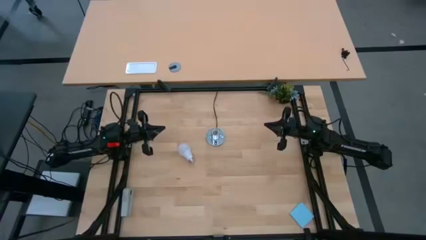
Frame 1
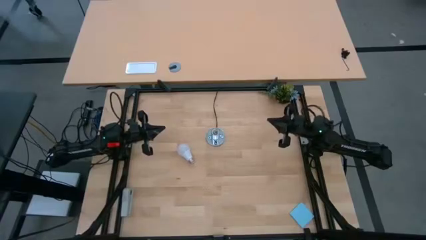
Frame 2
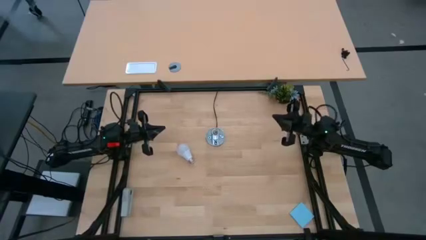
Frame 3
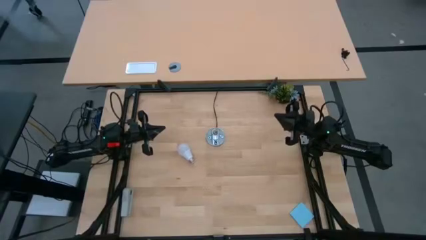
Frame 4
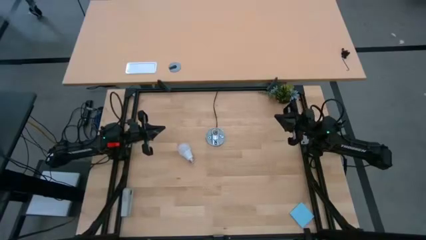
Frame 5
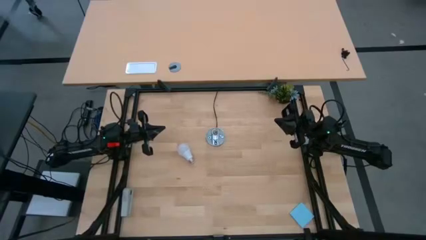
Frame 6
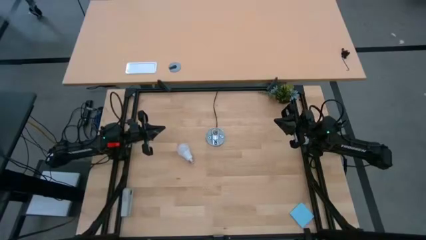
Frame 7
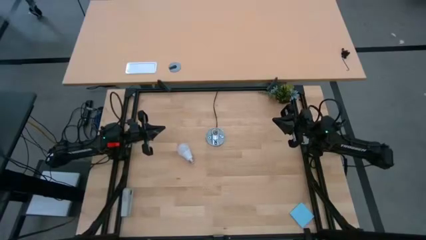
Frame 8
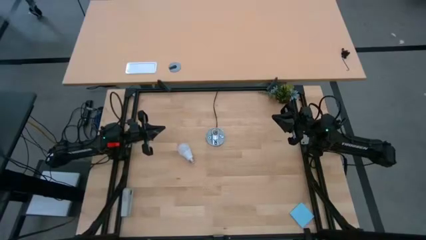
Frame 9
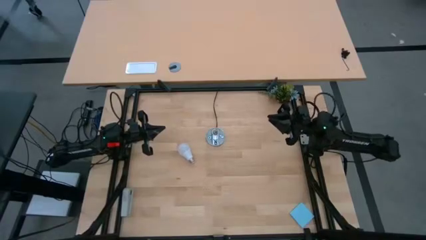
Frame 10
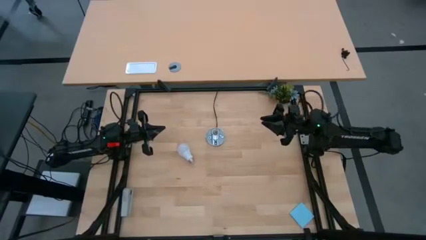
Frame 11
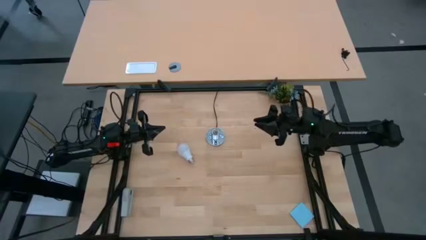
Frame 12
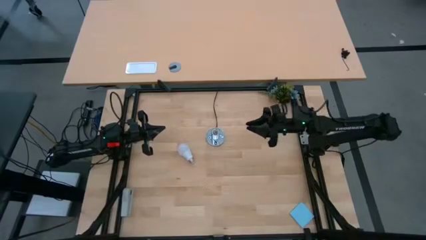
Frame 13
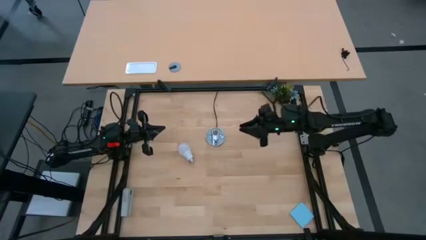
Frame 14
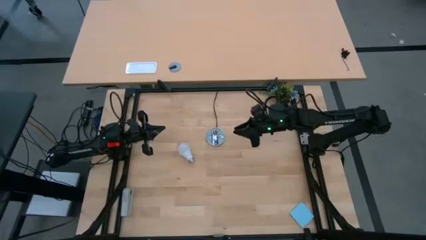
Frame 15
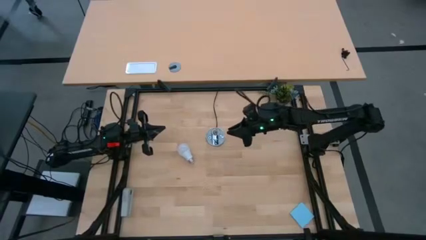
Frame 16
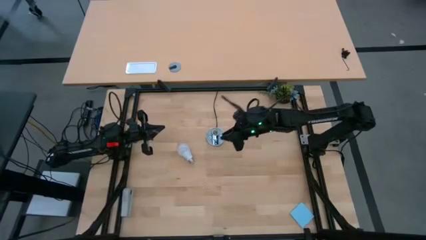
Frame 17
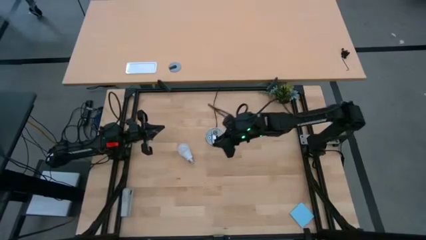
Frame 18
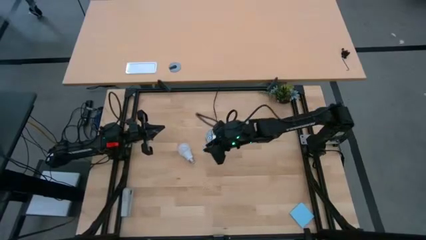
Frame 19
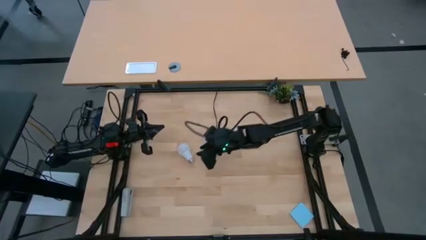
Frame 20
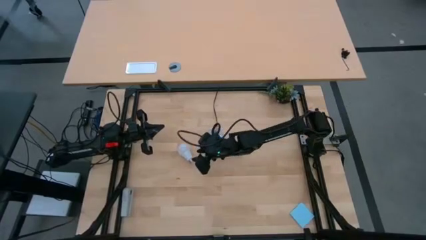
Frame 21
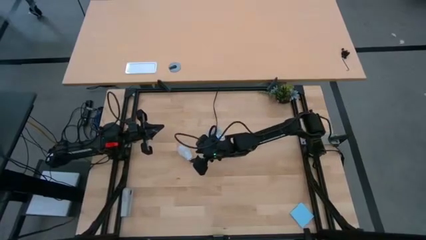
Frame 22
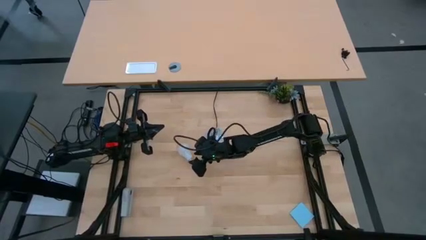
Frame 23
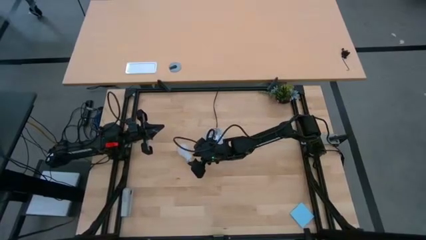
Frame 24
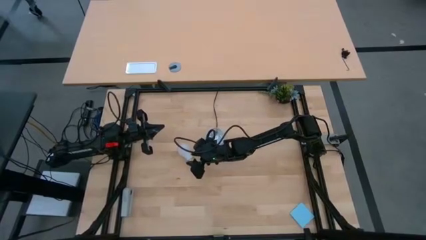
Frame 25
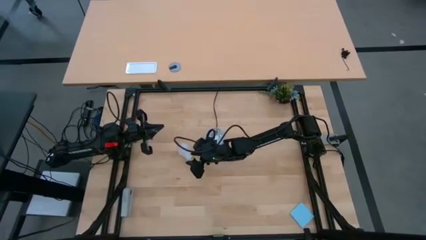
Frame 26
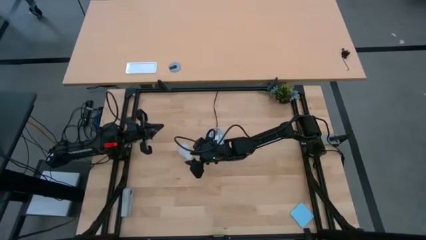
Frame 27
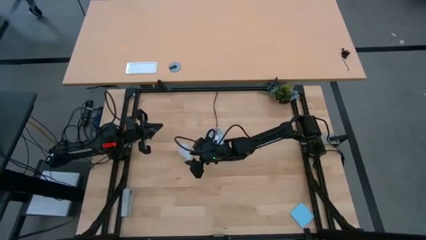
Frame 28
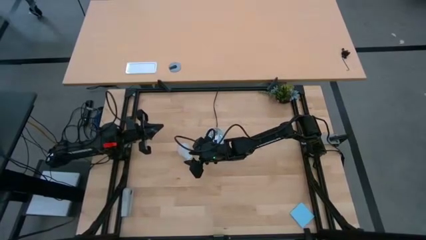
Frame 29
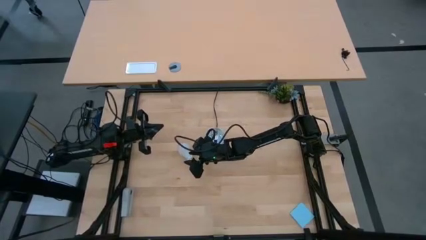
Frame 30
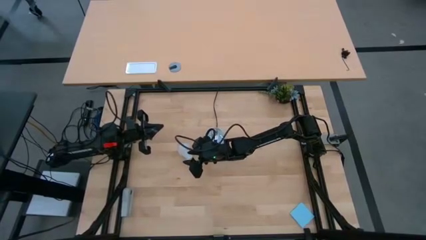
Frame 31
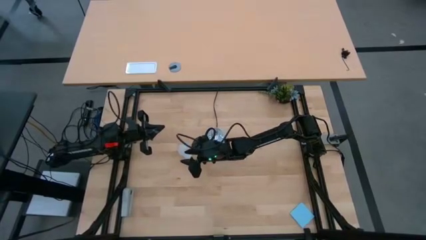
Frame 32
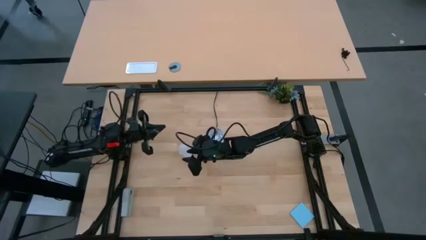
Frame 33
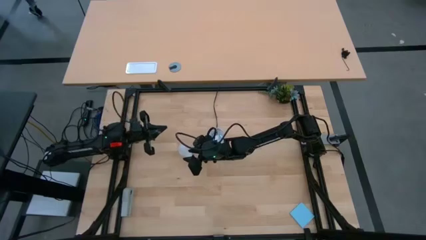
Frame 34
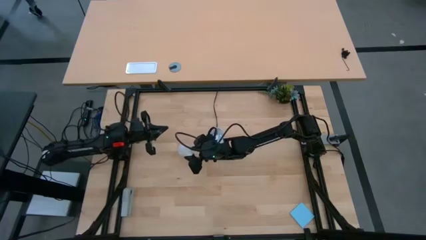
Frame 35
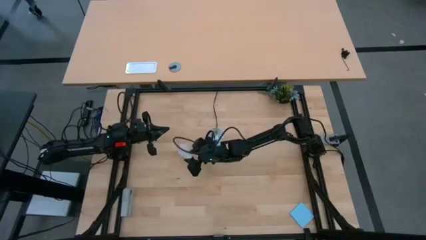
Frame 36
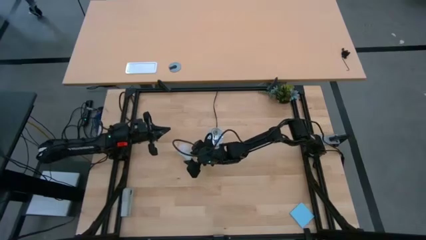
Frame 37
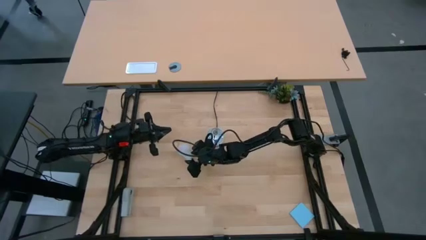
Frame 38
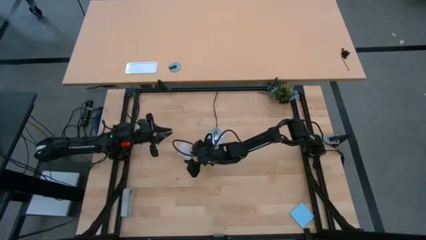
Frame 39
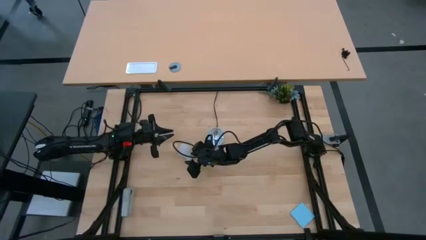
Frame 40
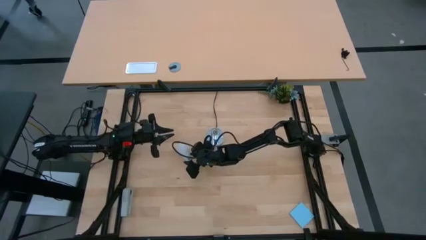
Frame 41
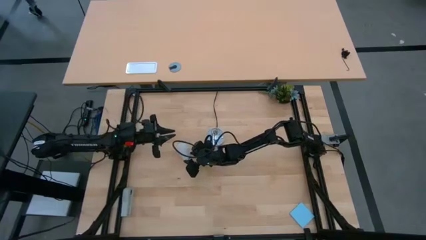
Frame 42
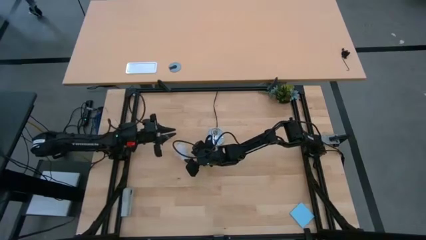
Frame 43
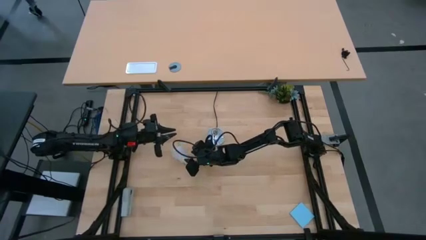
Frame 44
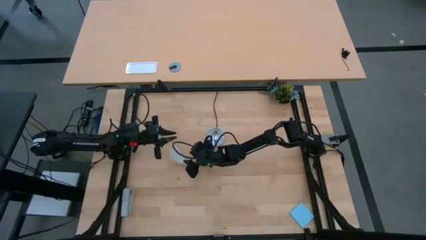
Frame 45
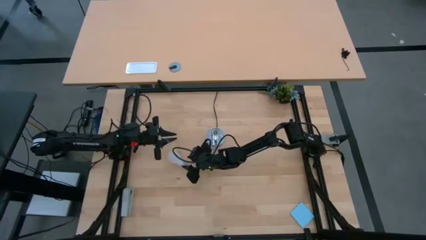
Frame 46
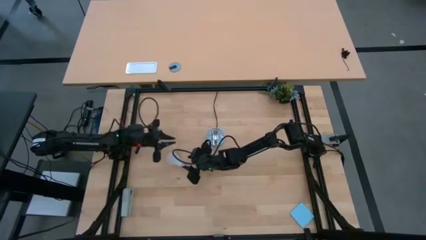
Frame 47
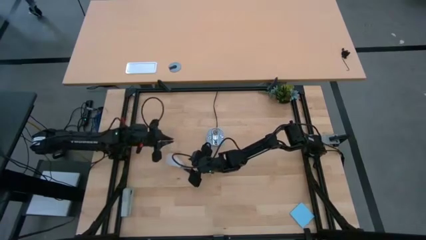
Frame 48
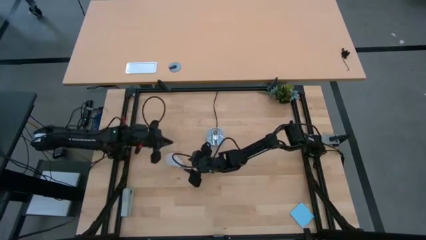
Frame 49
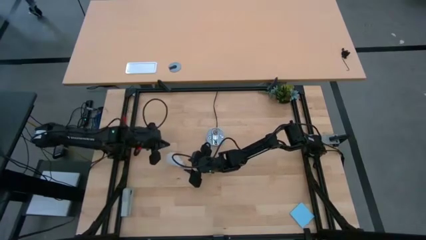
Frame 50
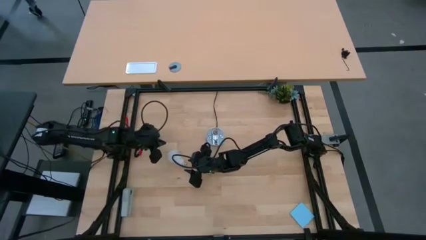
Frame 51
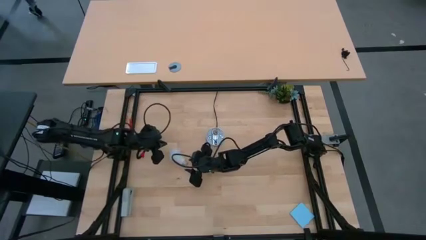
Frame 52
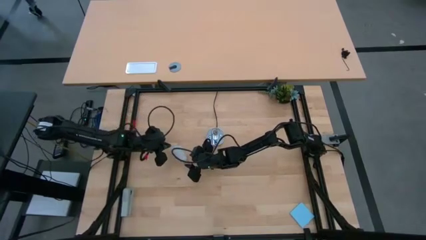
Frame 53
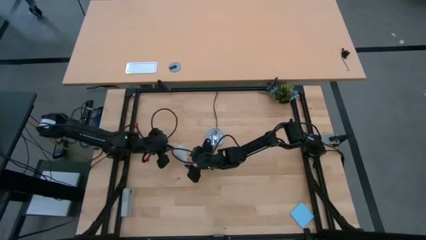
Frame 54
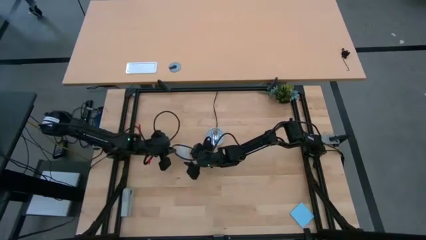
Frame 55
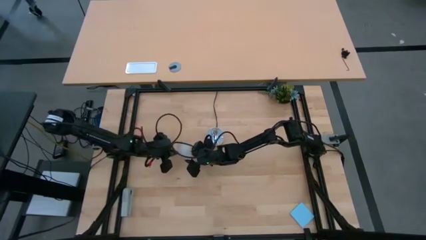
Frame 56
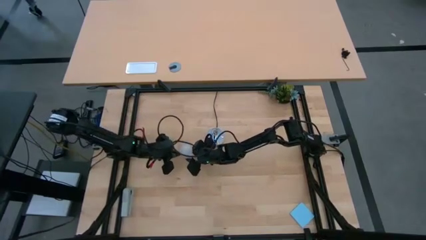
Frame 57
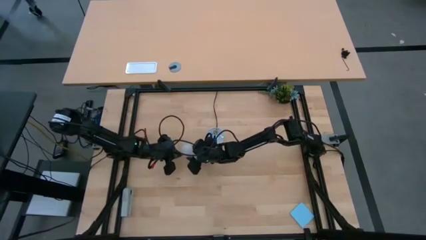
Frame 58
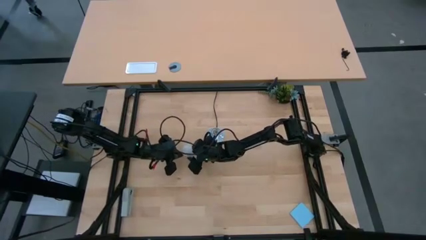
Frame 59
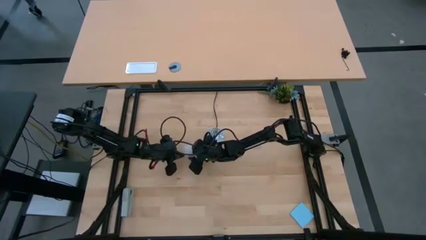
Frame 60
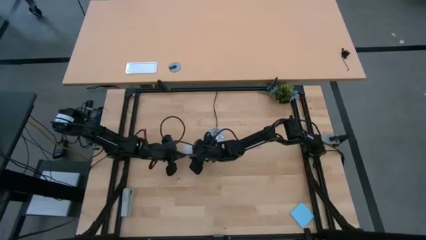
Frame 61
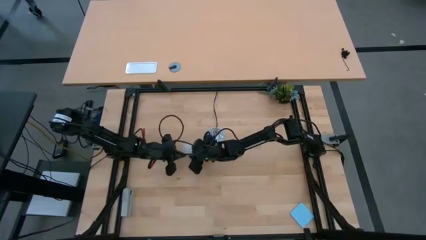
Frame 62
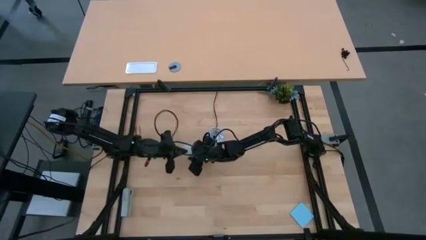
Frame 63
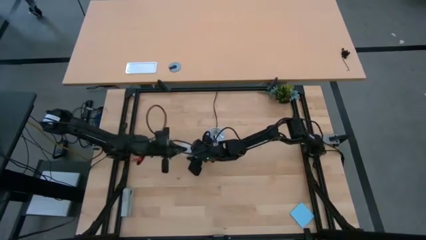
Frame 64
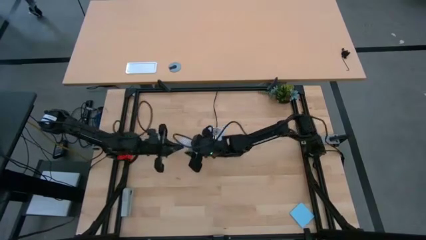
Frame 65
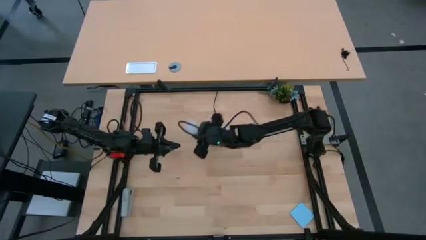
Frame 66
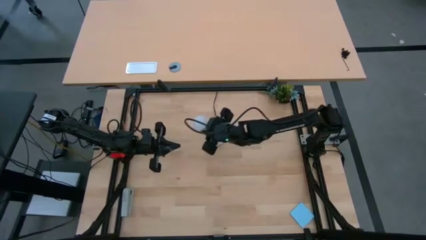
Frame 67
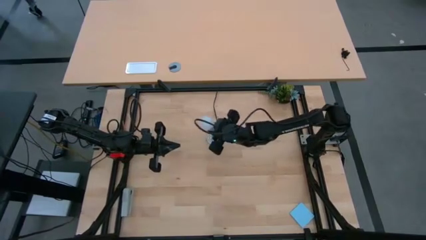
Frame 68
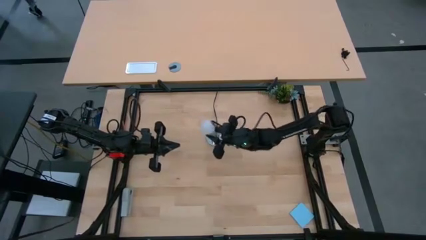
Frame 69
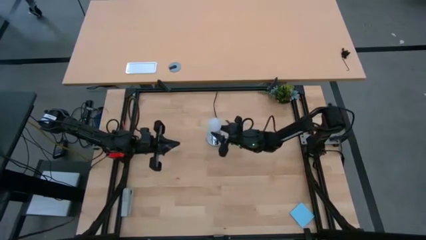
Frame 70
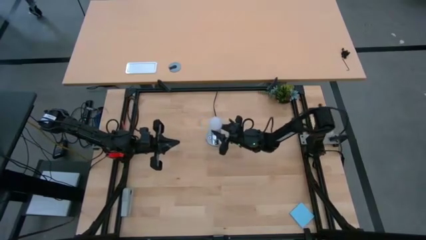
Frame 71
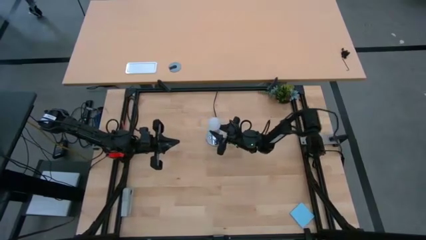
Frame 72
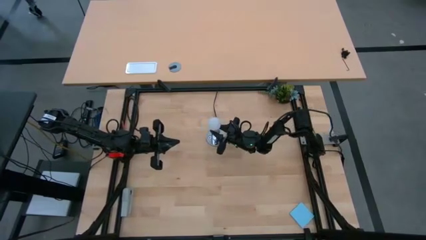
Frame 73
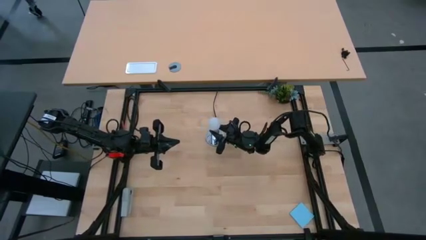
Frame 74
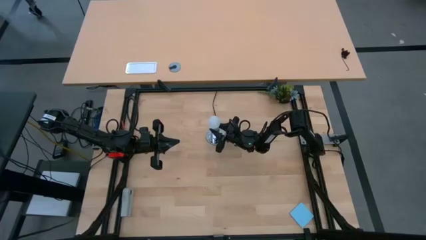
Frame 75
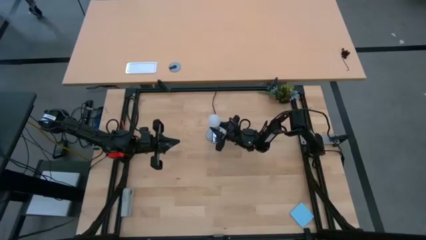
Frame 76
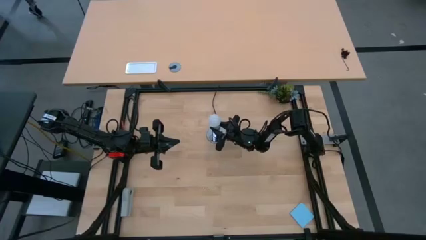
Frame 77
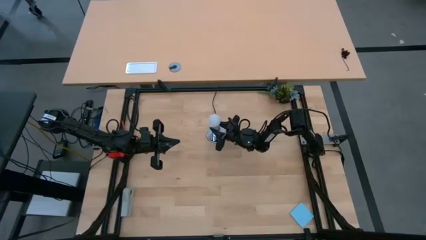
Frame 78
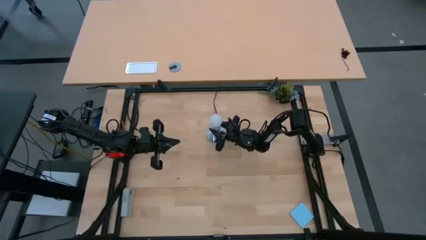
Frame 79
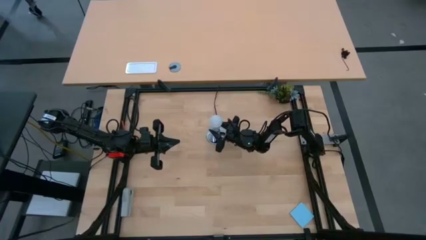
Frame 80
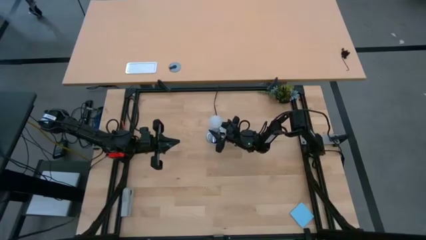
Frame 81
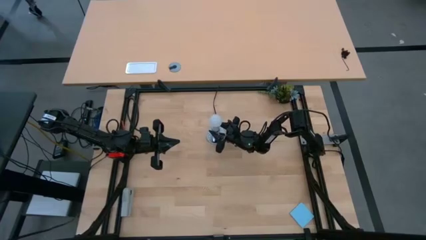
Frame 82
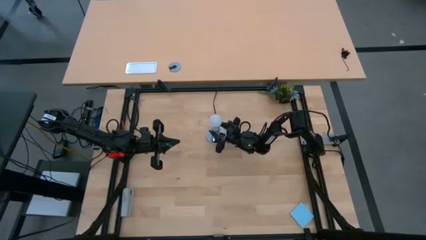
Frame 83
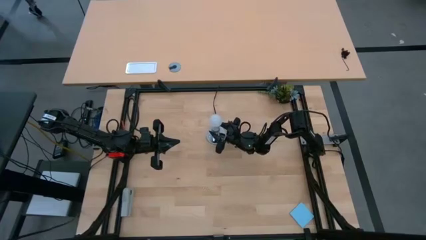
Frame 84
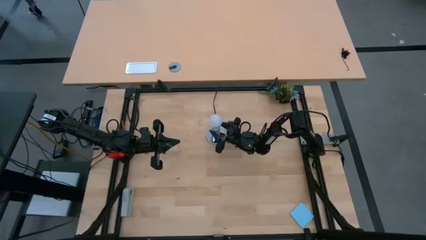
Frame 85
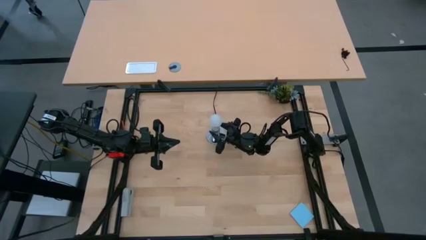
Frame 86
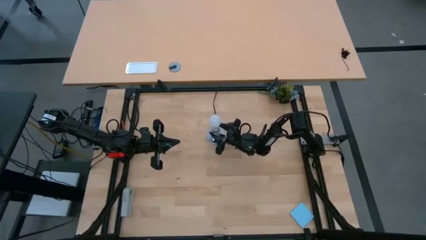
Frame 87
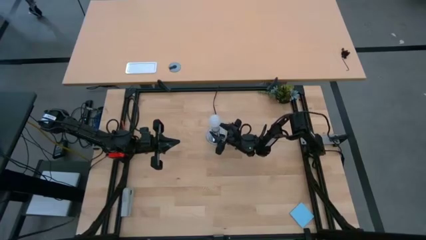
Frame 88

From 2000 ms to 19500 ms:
Task: Screw lightbulb
Insert the lightbulb into the lamp socket
